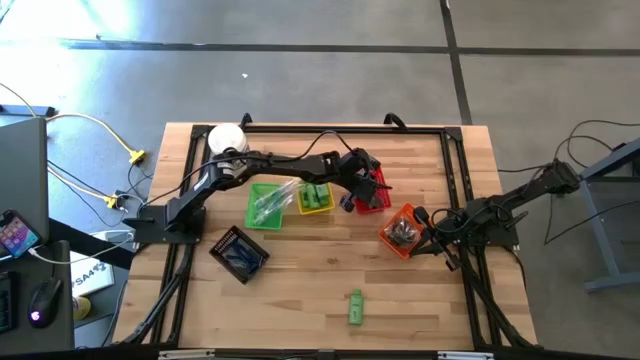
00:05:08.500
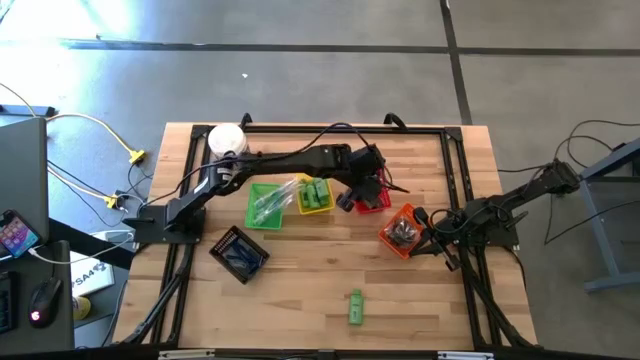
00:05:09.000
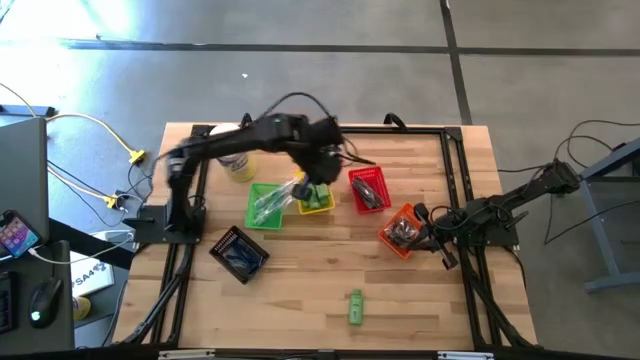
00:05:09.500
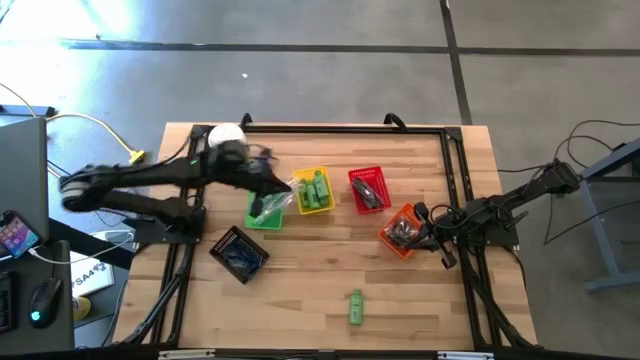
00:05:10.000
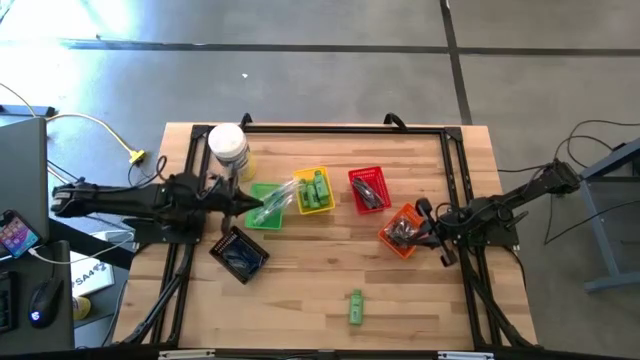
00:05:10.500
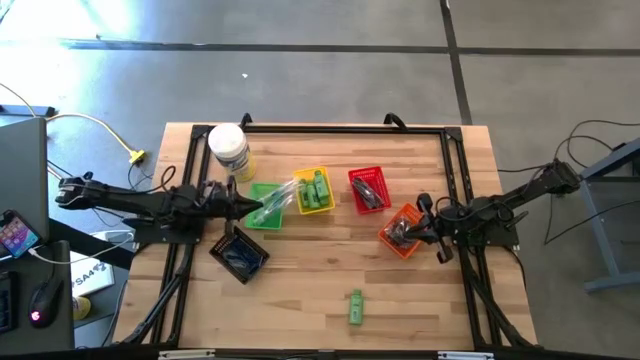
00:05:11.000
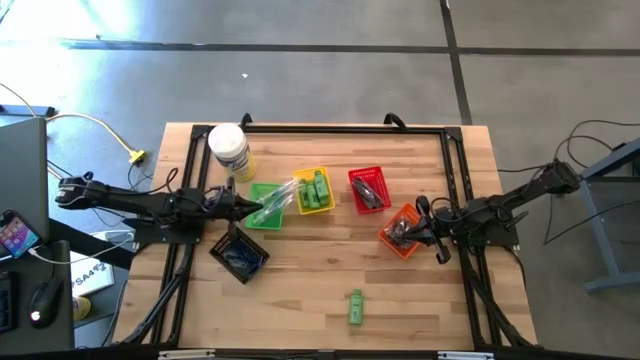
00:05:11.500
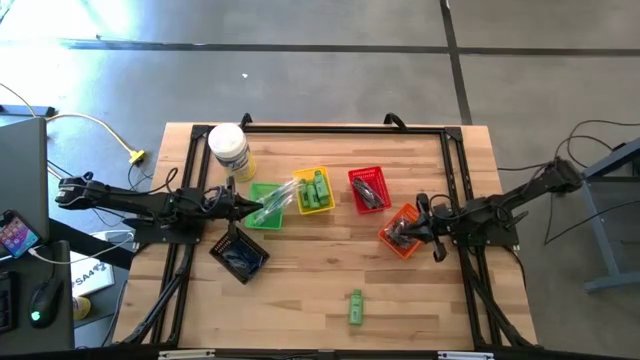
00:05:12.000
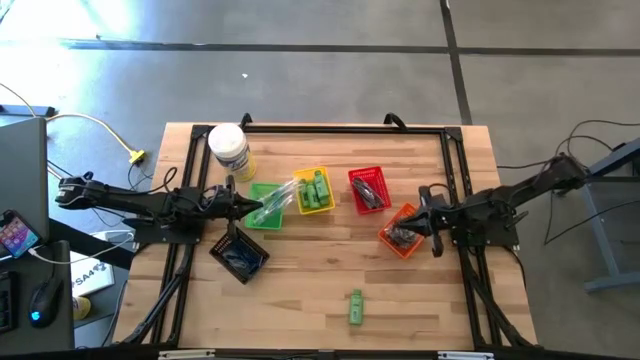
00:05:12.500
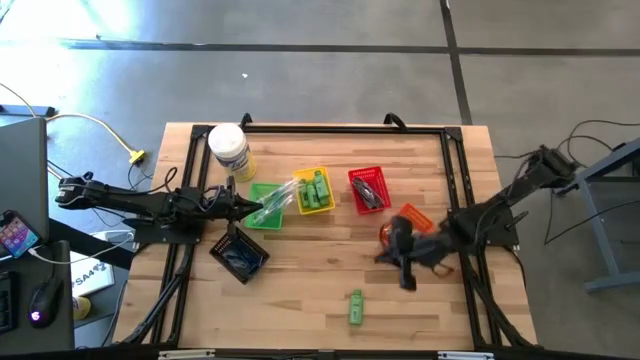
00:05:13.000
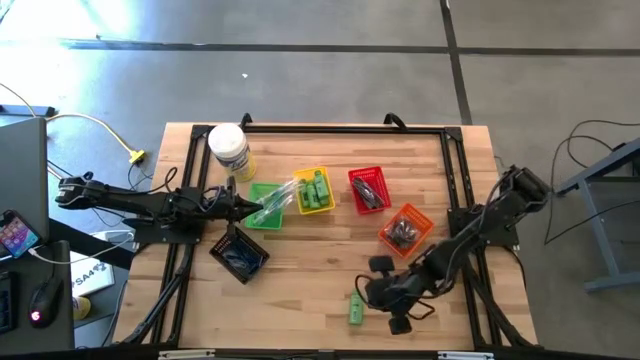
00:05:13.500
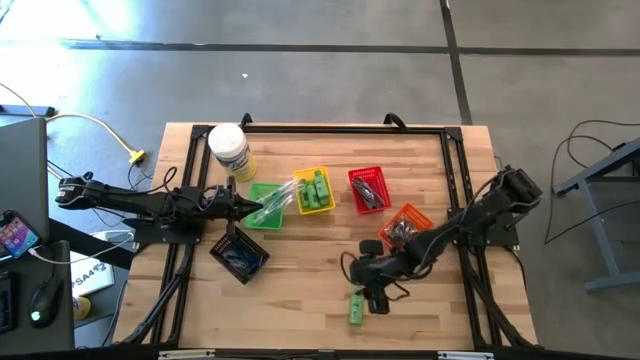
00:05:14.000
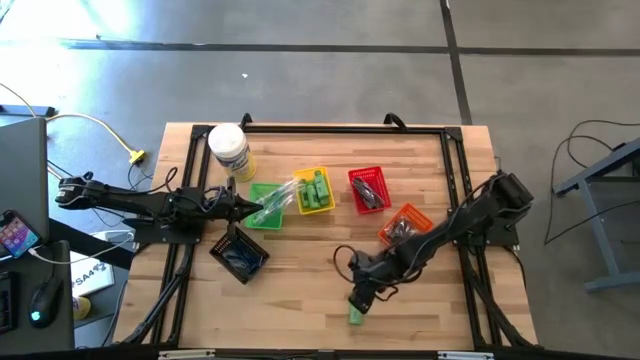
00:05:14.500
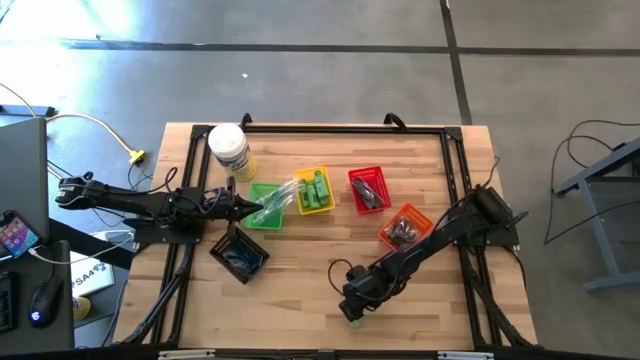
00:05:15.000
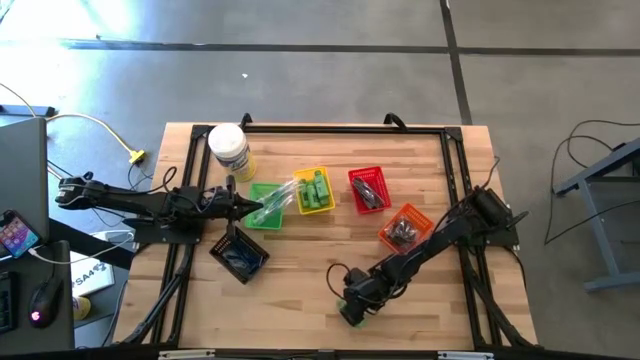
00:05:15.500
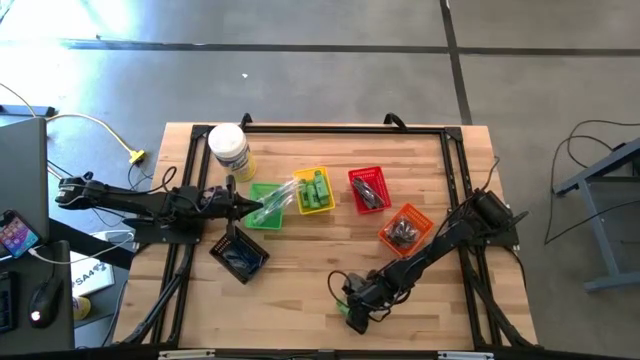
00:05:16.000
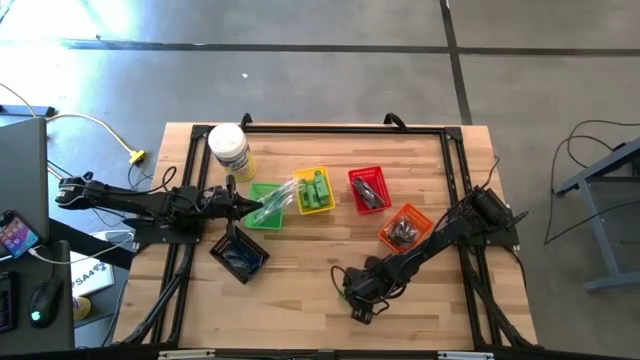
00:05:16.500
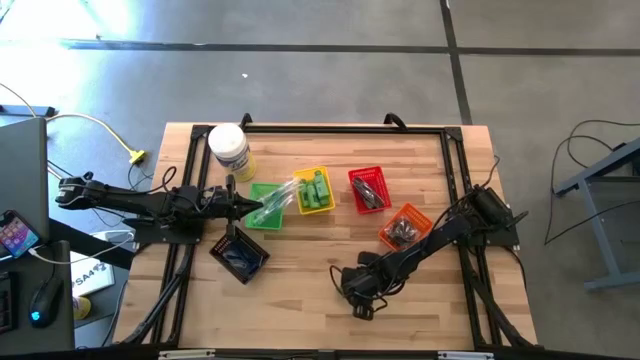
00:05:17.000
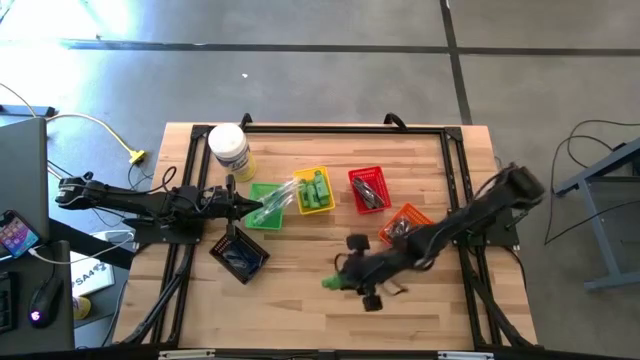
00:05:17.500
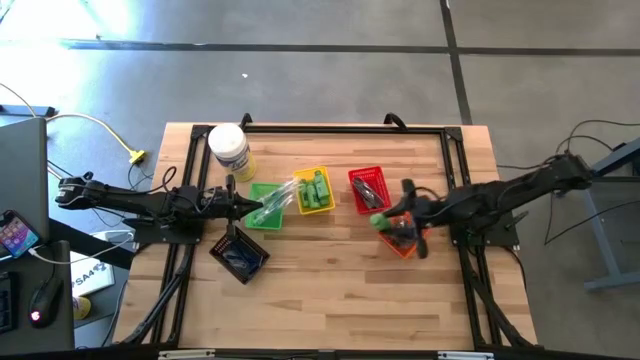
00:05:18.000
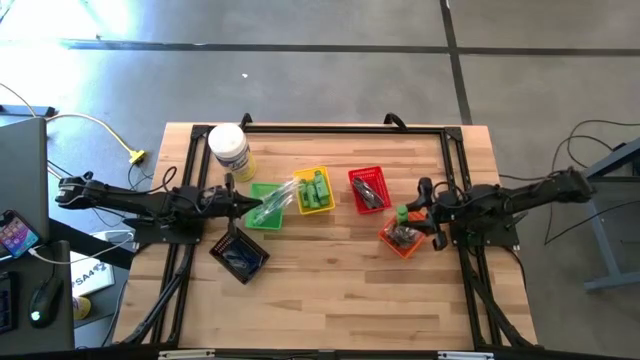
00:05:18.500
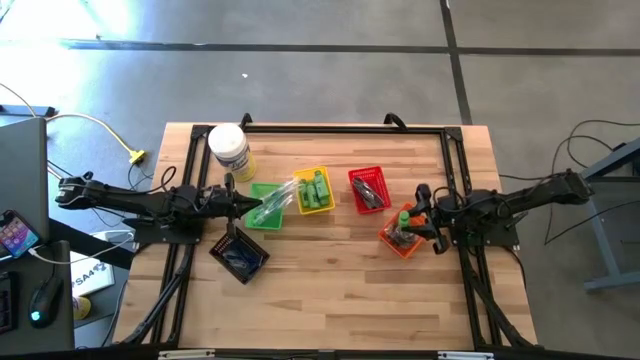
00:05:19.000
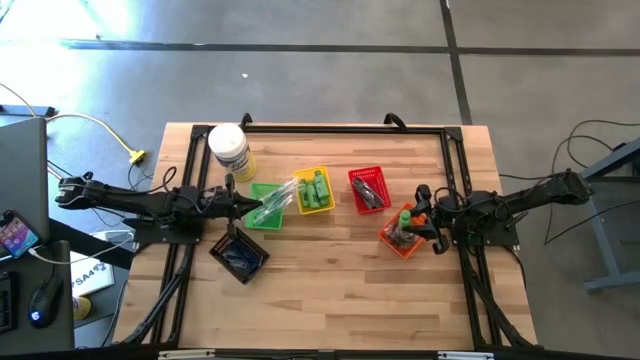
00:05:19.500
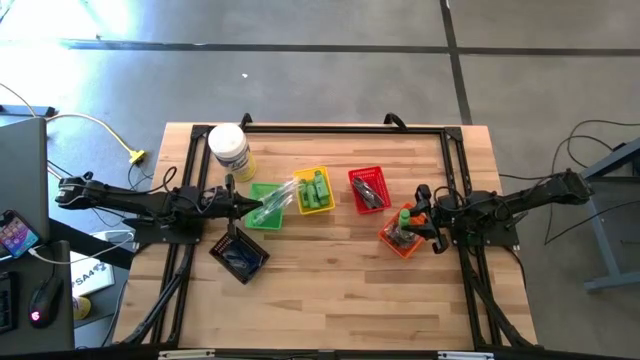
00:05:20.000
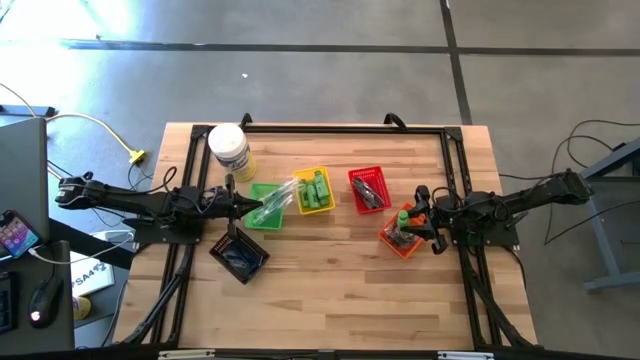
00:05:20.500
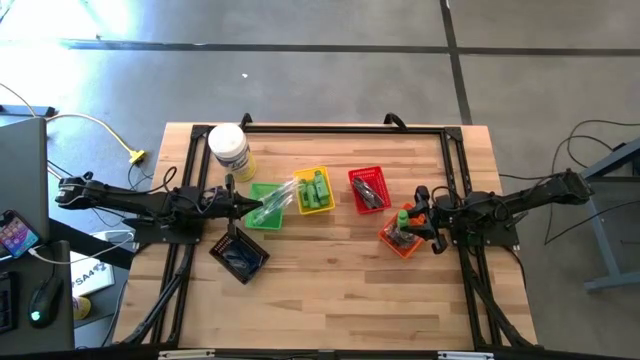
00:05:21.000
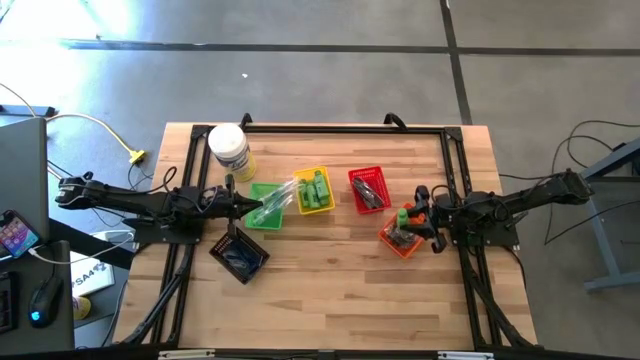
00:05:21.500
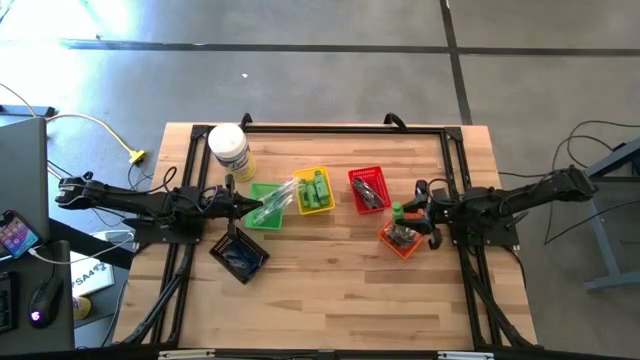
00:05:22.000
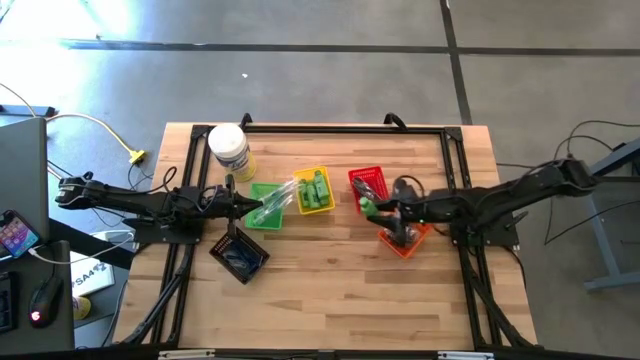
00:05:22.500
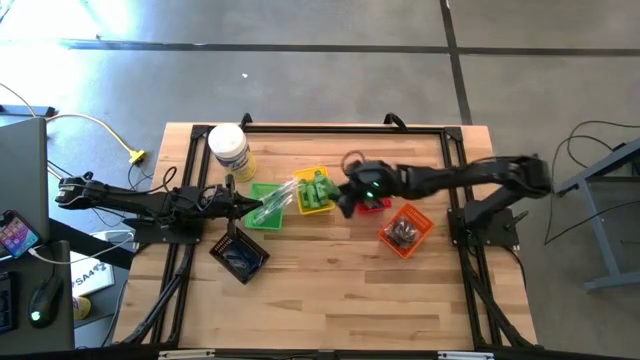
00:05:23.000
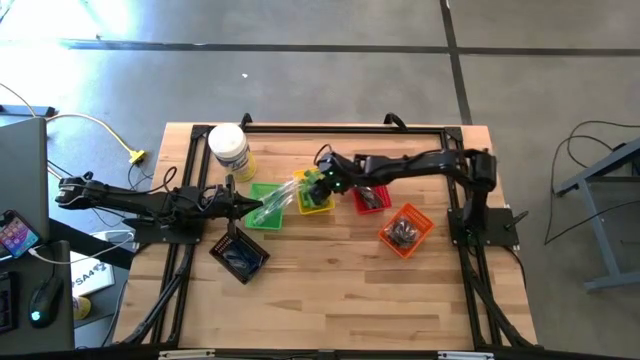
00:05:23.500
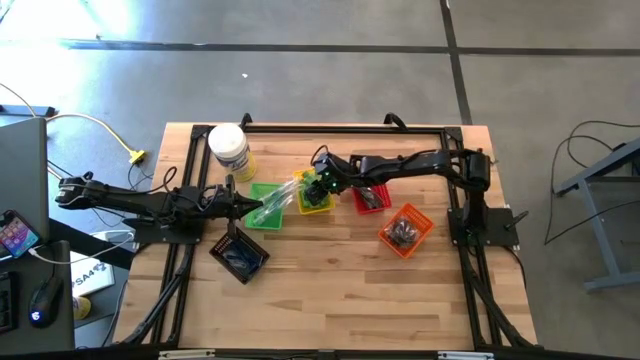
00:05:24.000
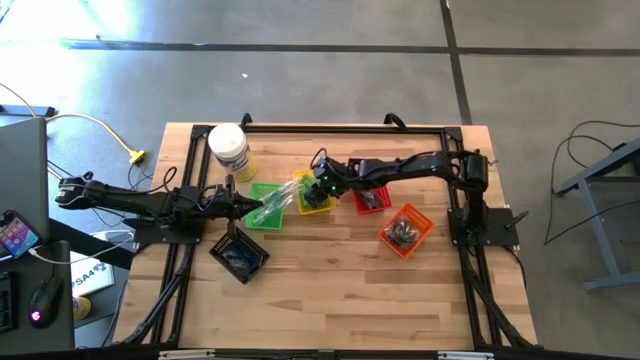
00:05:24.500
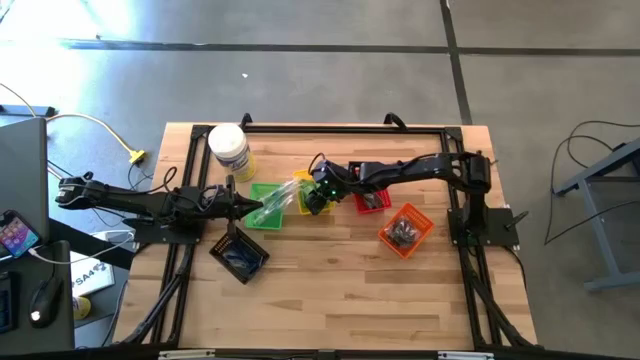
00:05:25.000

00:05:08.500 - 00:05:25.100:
Task: Pick & Place Travel size toiletries
Put the green shampoo into yellow basket

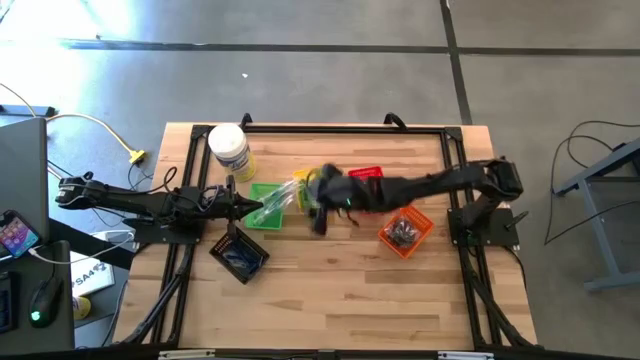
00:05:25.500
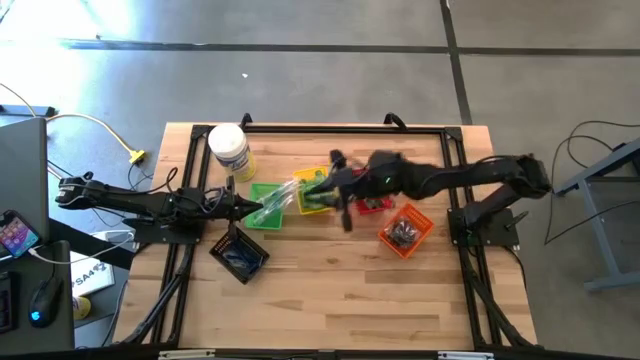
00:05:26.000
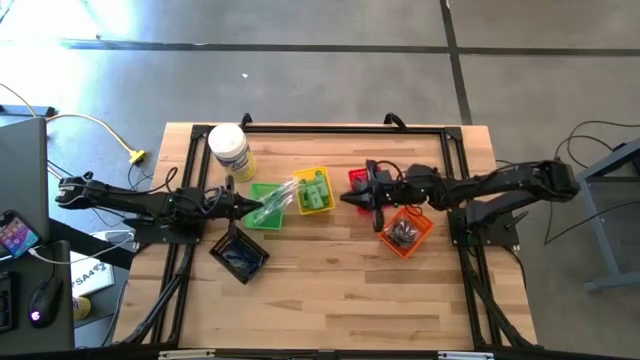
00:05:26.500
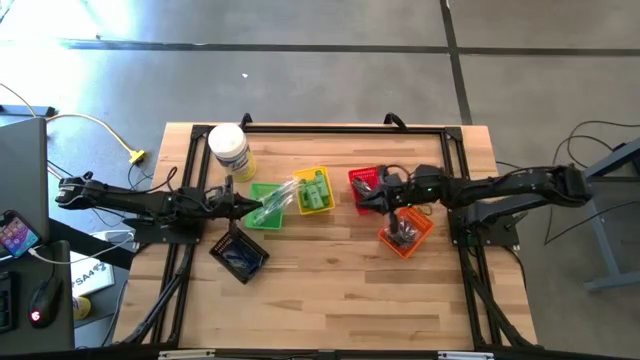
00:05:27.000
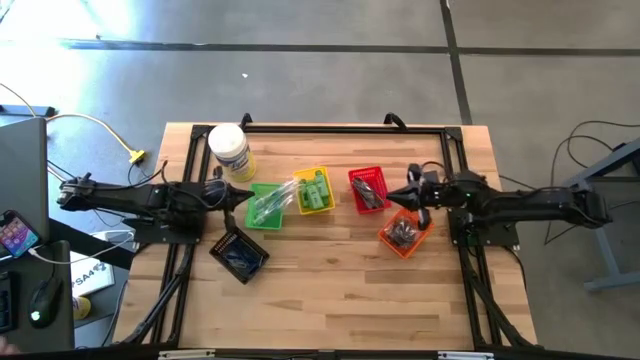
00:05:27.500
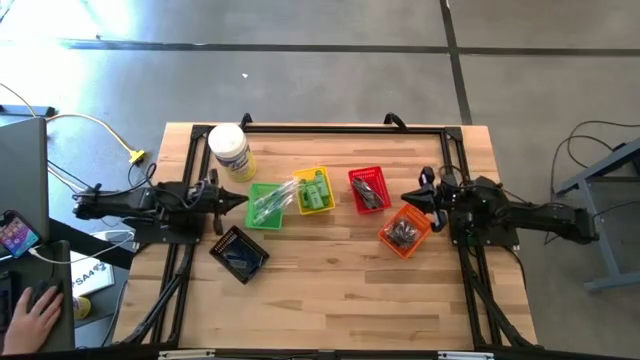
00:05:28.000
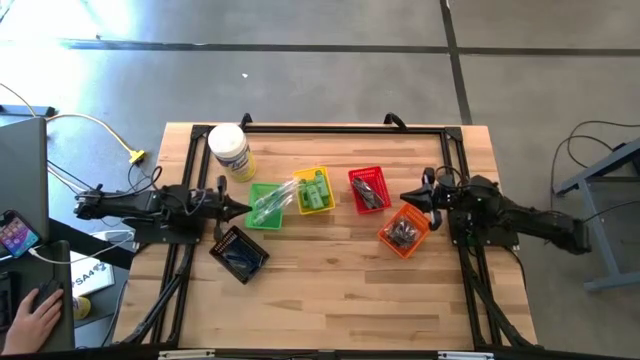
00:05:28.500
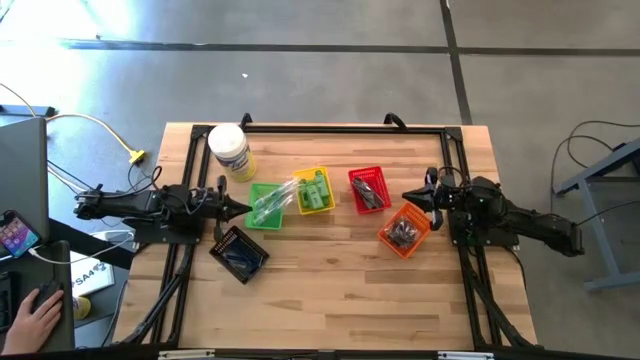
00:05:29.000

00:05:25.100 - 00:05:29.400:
Return to Home Position
